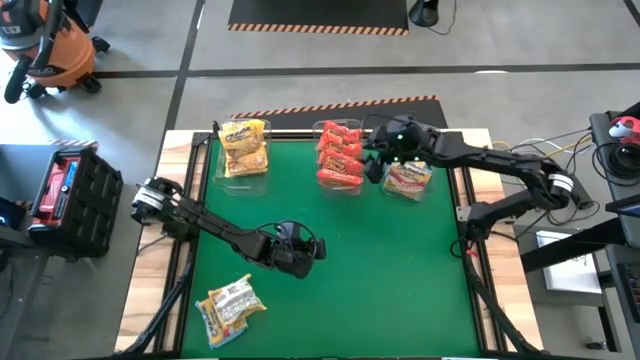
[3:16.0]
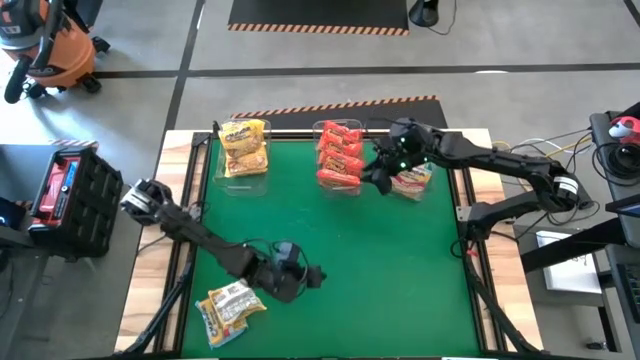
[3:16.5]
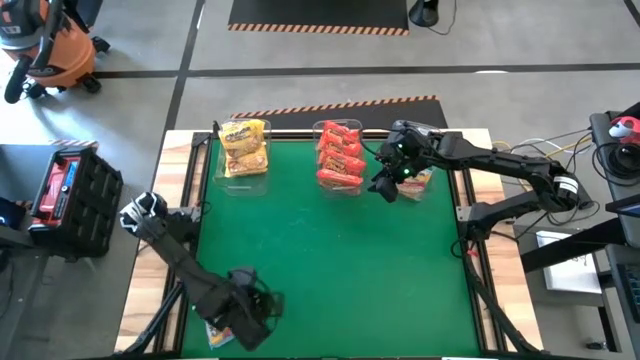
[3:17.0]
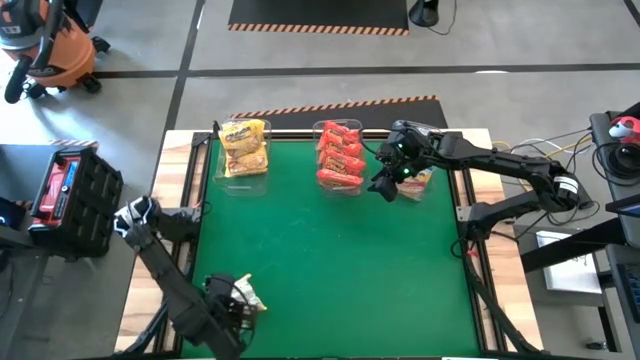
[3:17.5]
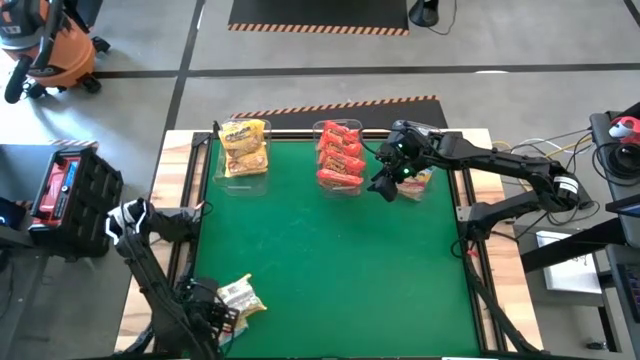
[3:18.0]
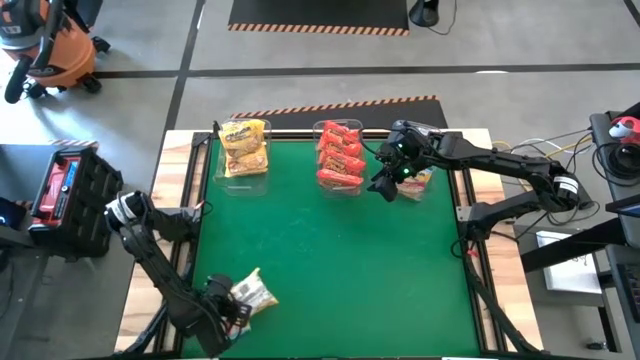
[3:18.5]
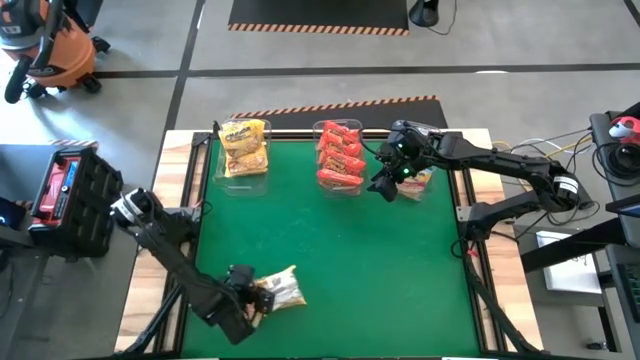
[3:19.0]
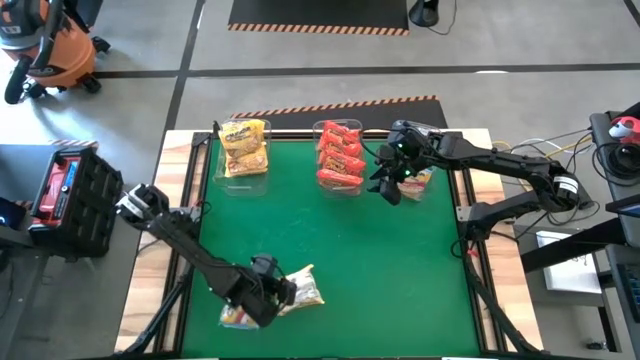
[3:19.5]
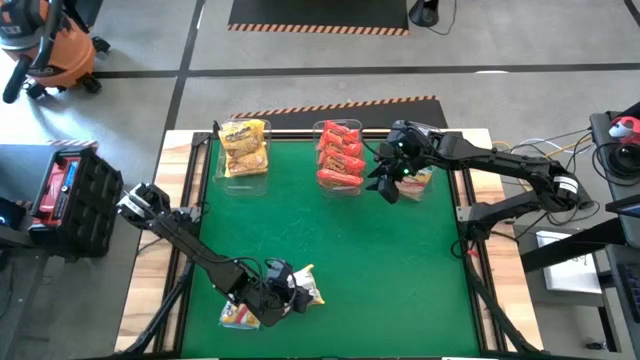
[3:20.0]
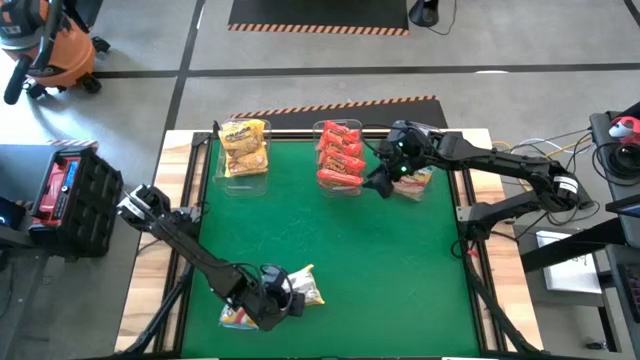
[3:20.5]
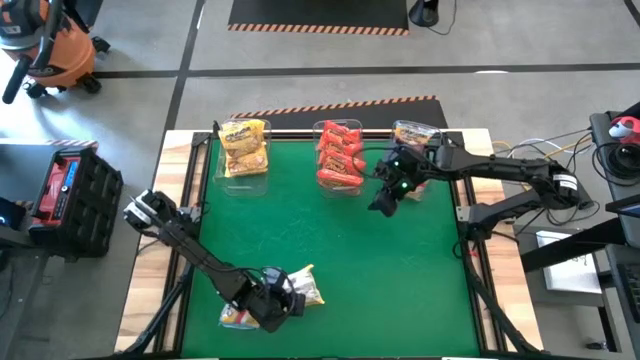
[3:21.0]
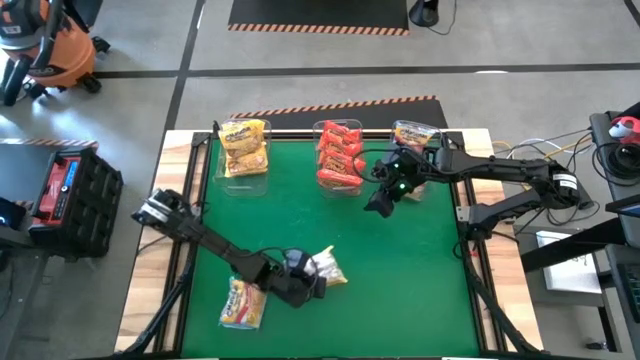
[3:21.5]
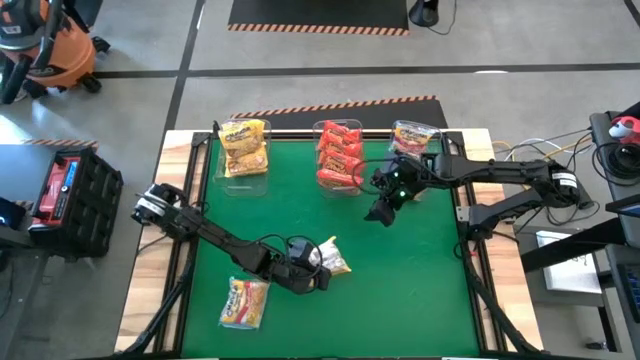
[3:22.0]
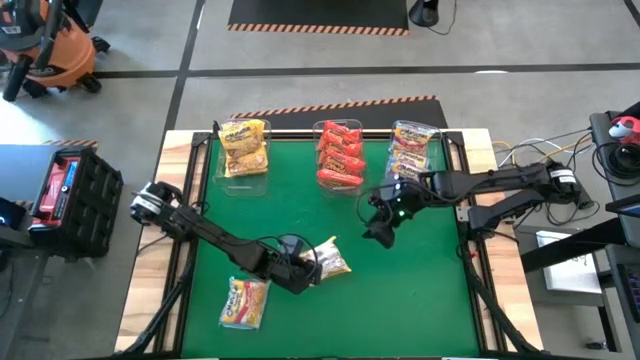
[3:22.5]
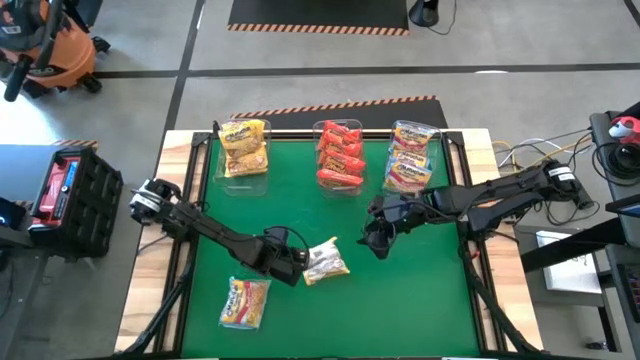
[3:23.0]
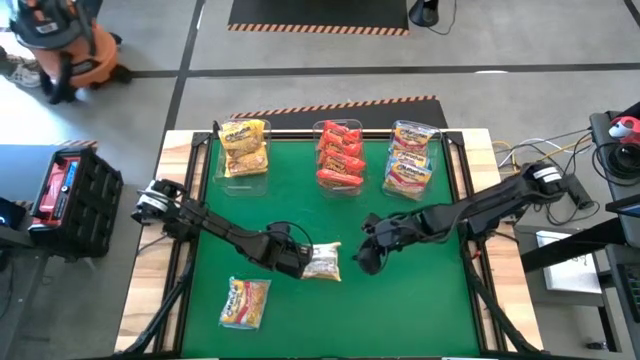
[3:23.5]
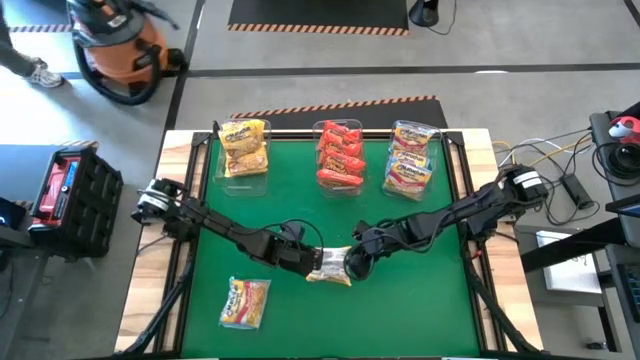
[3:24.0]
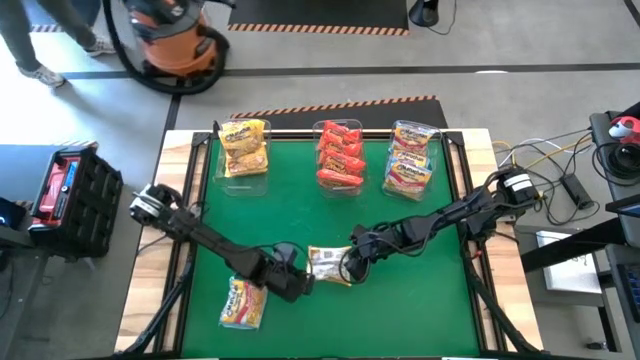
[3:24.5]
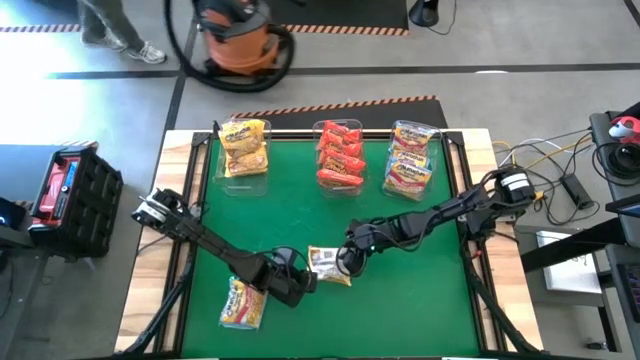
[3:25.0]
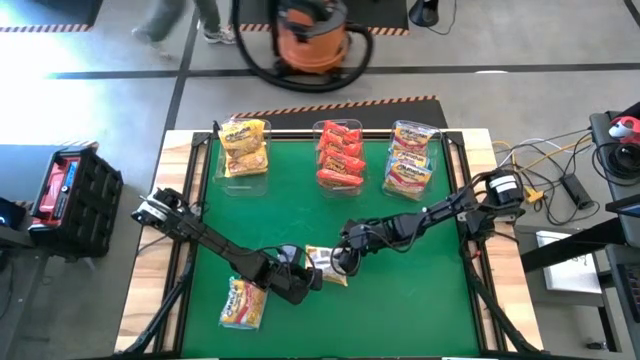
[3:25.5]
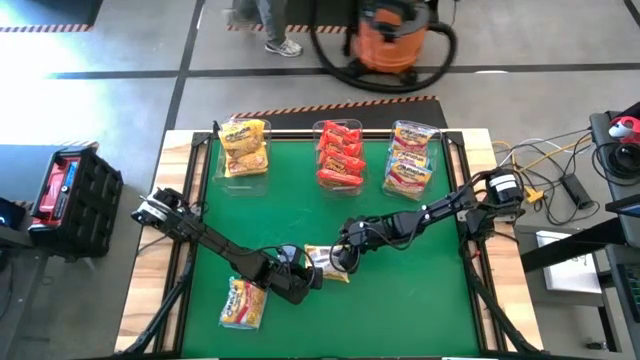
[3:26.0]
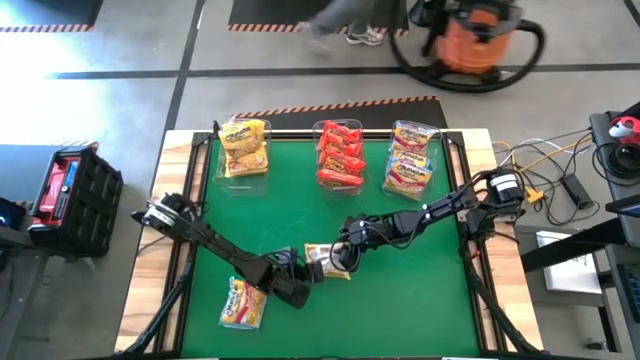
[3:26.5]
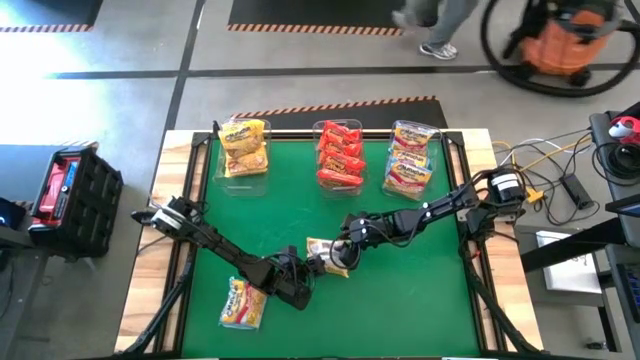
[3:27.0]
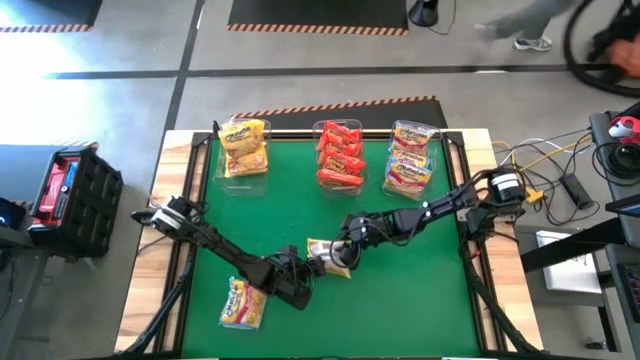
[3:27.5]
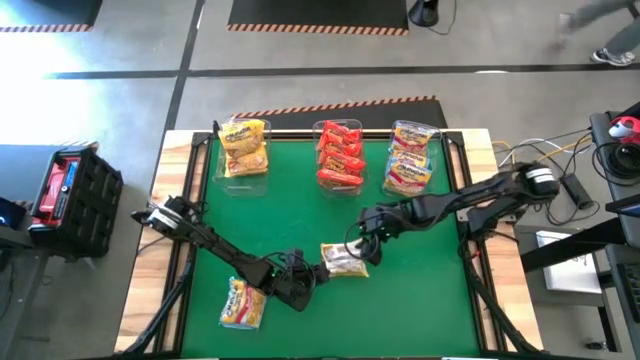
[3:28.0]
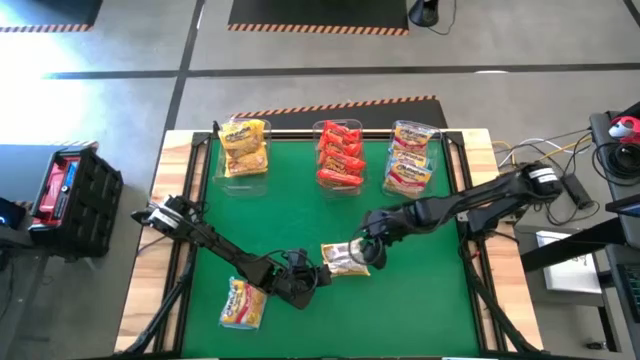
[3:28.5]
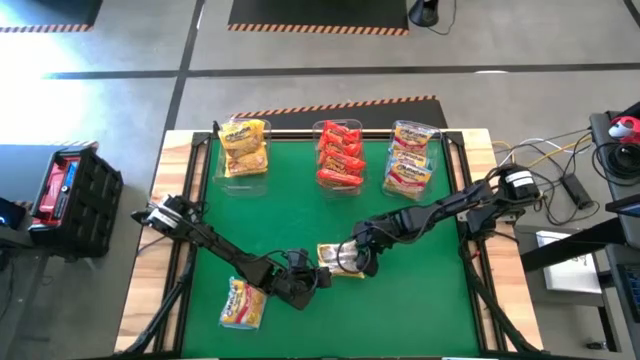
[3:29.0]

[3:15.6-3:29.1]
Task: Sort Maruchan noodles
Put the yellow noodle pack into the left transparent bin

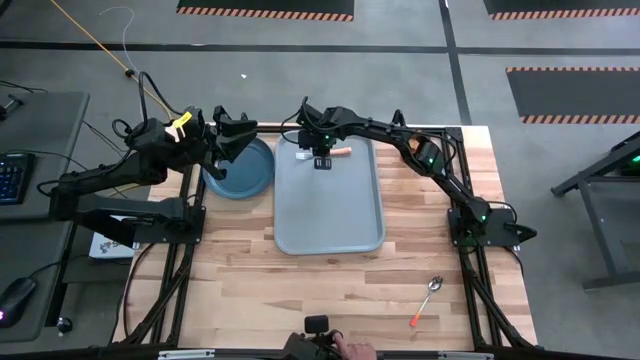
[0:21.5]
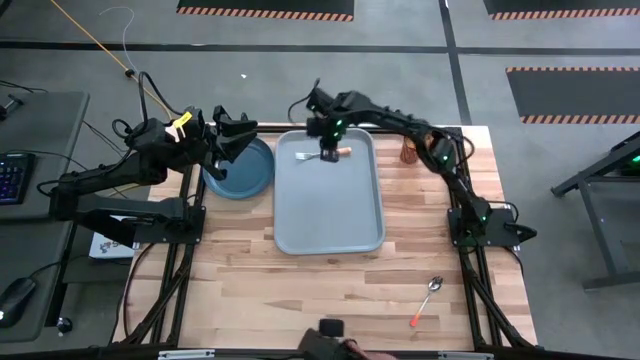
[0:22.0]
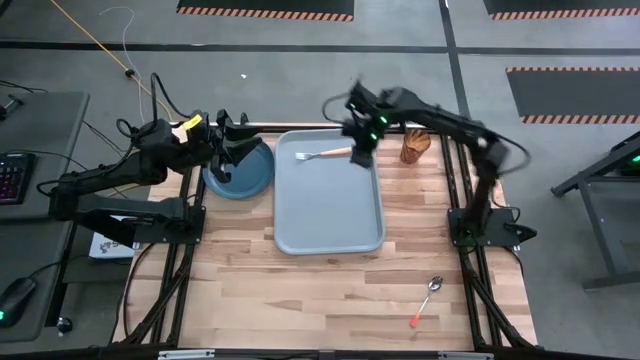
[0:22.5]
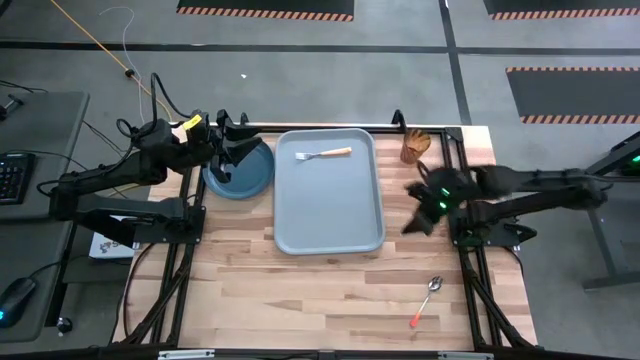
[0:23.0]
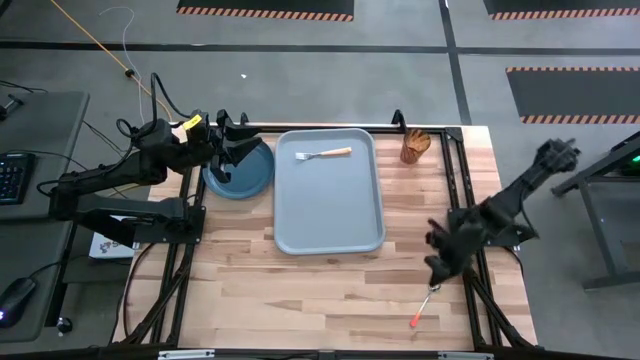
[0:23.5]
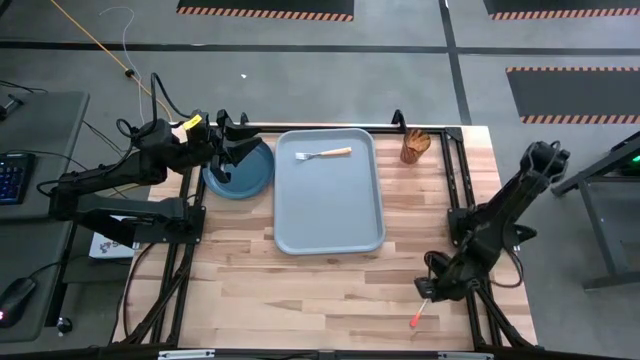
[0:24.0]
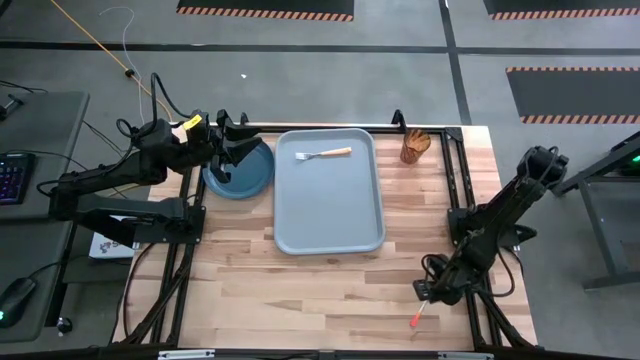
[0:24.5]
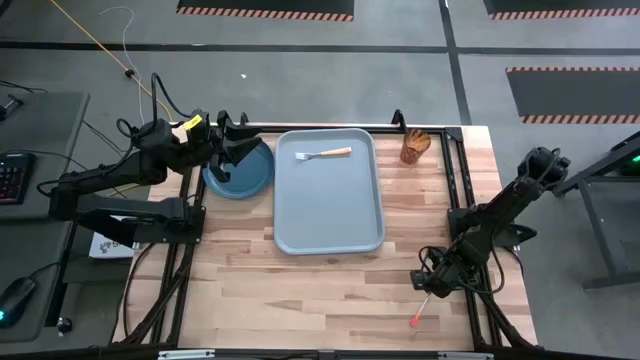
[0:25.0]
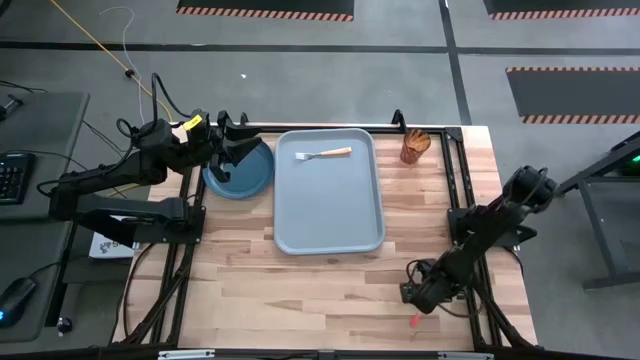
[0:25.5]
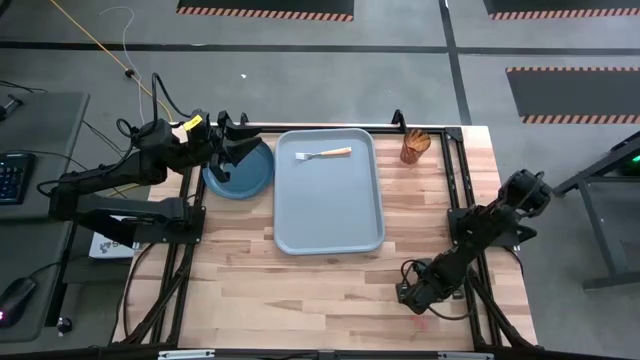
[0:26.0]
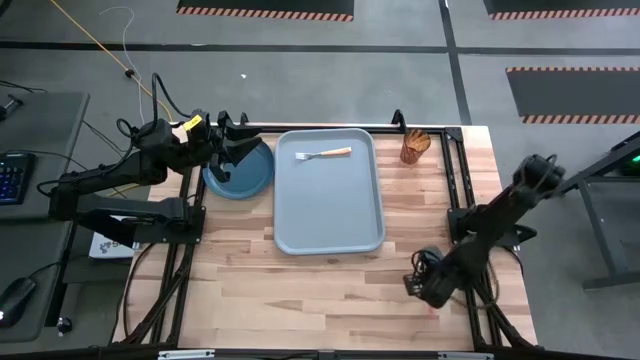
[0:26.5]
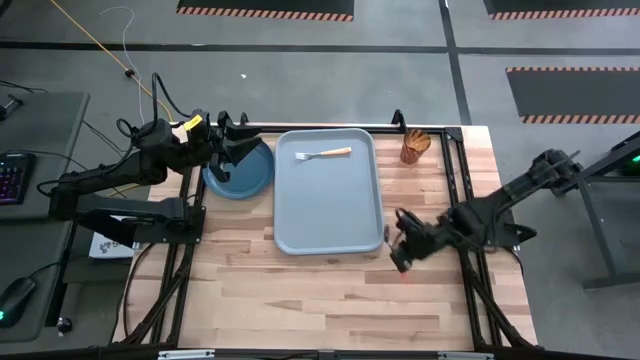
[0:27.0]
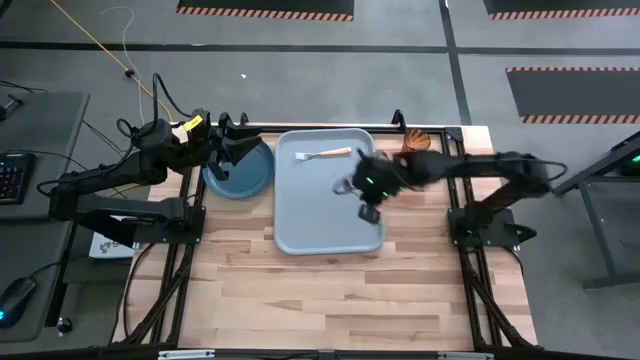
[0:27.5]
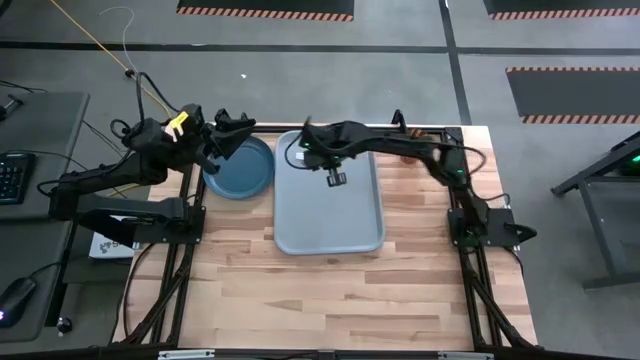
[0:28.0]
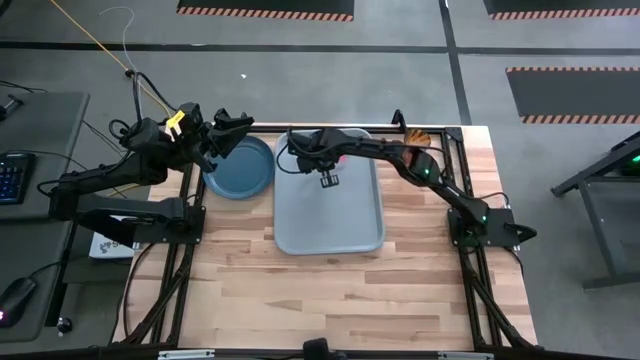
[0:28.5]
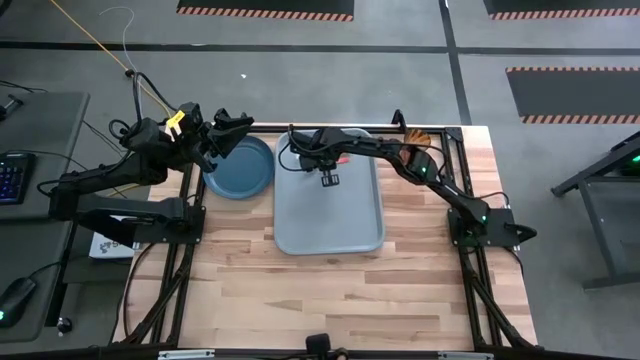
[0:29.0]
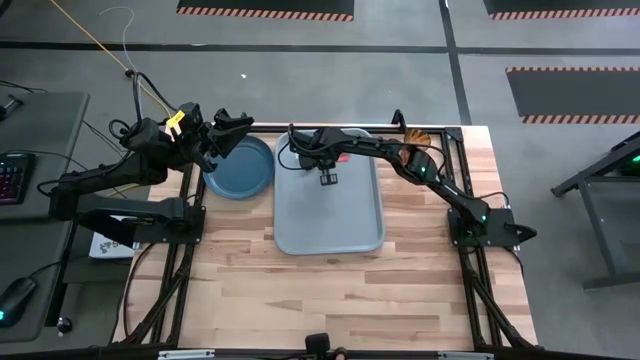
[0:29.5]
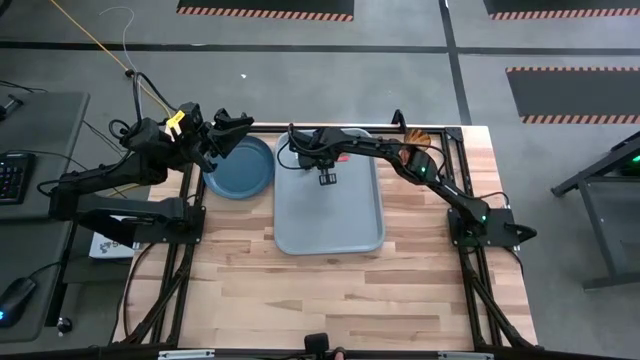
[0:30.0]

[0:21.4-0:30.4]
Task: Pick and place plate/cup/fork/spoon on tray
Put the orange spoon below the light orange fork on the gray tray
